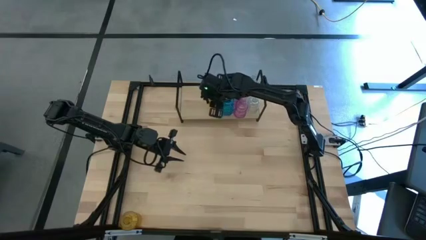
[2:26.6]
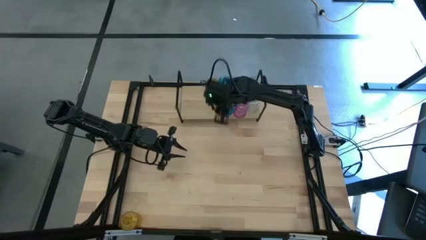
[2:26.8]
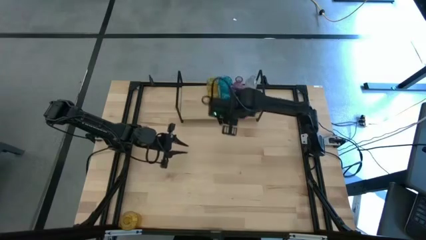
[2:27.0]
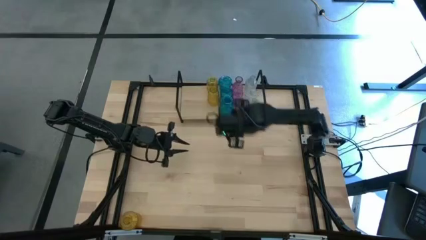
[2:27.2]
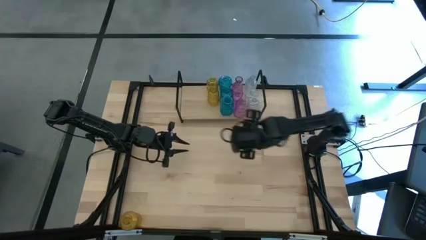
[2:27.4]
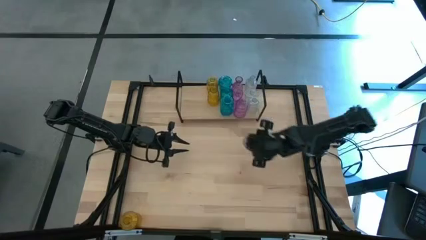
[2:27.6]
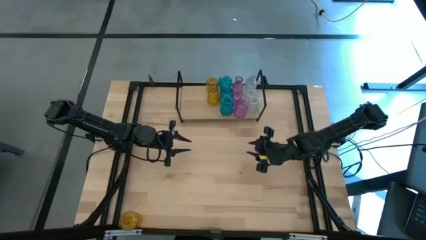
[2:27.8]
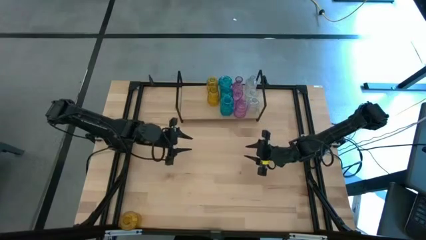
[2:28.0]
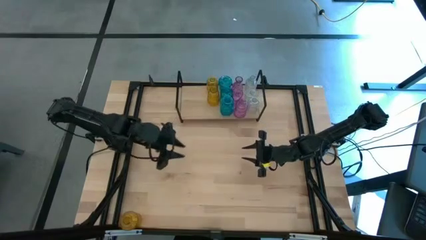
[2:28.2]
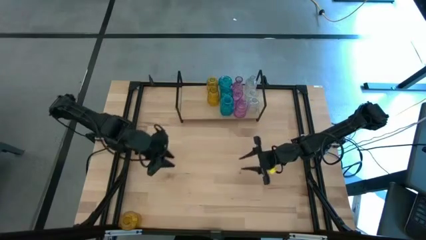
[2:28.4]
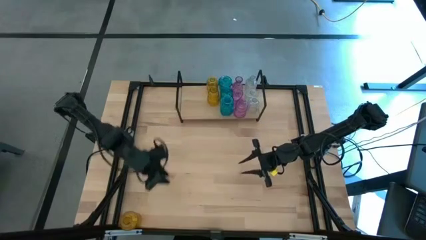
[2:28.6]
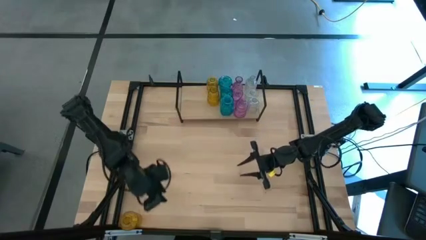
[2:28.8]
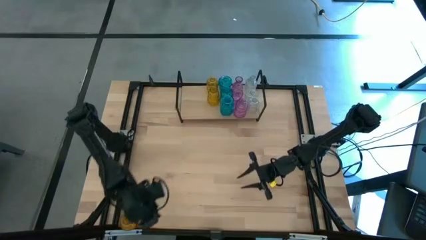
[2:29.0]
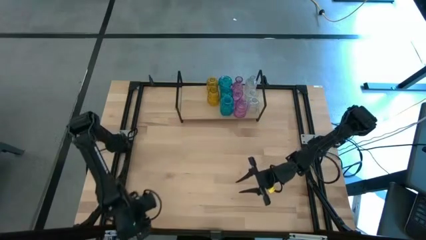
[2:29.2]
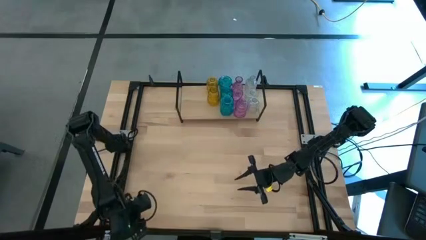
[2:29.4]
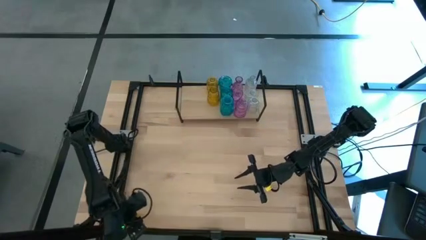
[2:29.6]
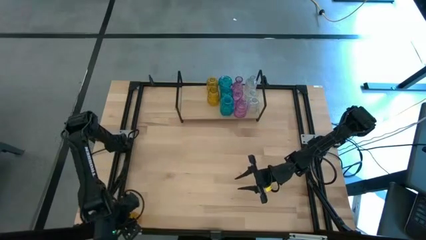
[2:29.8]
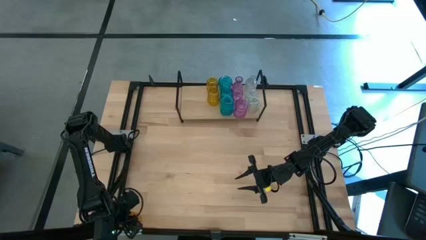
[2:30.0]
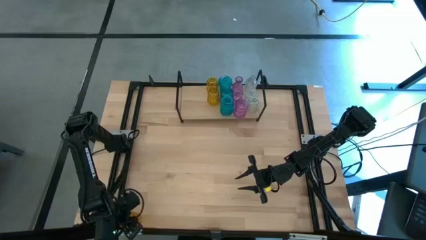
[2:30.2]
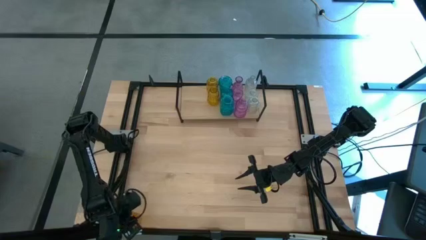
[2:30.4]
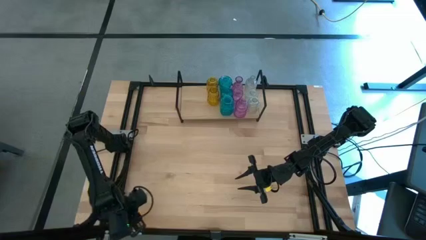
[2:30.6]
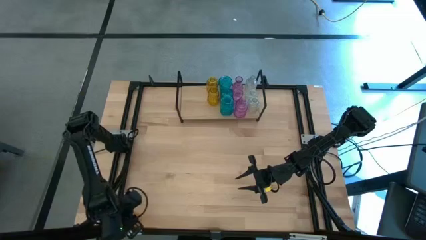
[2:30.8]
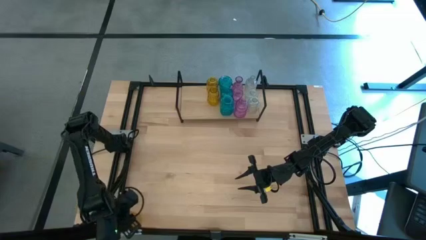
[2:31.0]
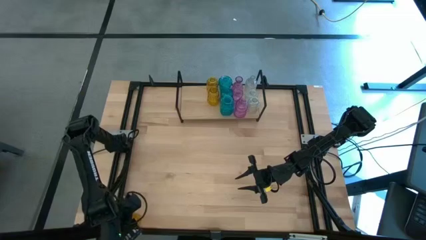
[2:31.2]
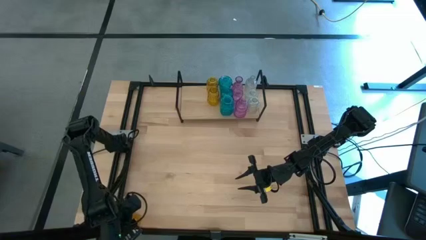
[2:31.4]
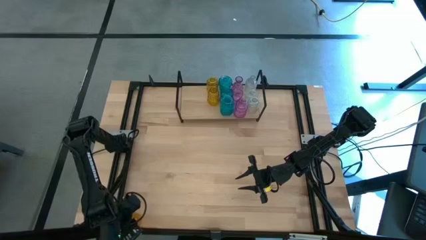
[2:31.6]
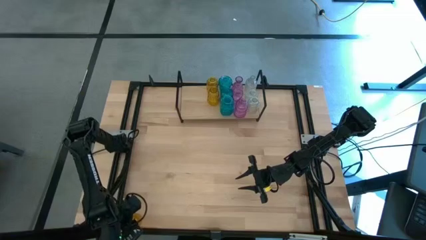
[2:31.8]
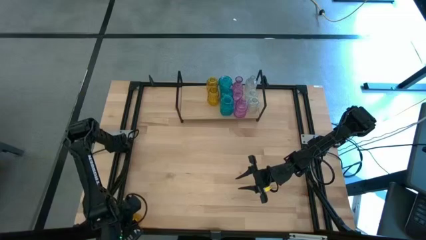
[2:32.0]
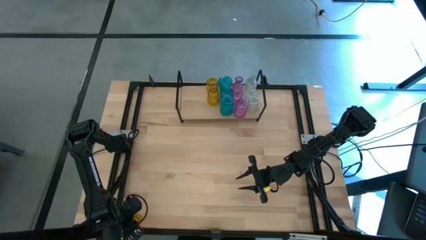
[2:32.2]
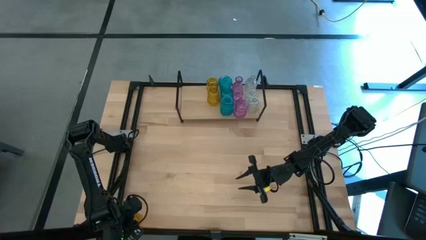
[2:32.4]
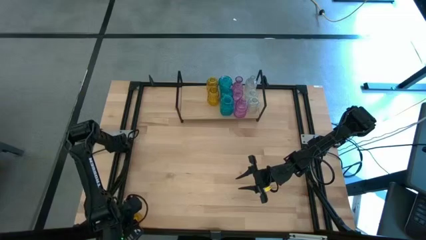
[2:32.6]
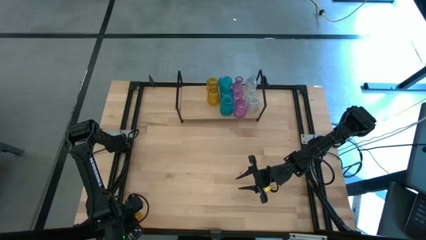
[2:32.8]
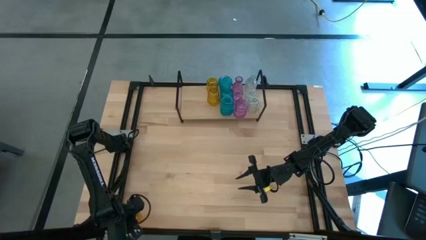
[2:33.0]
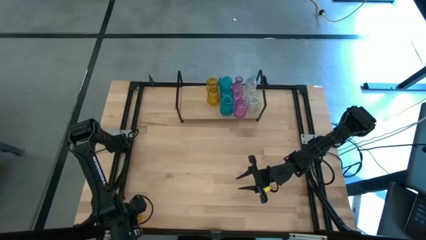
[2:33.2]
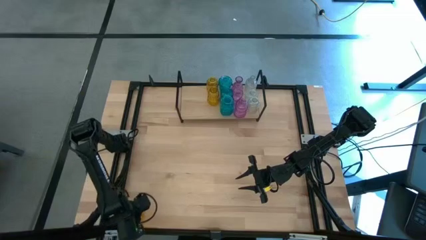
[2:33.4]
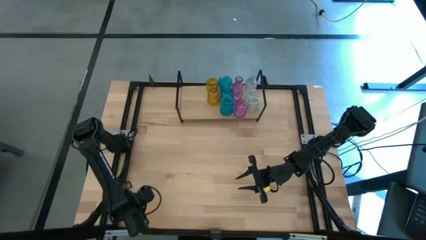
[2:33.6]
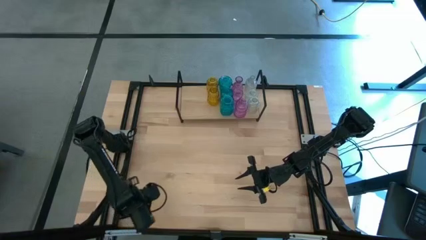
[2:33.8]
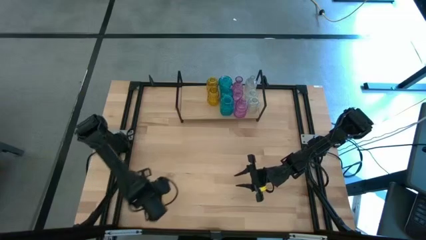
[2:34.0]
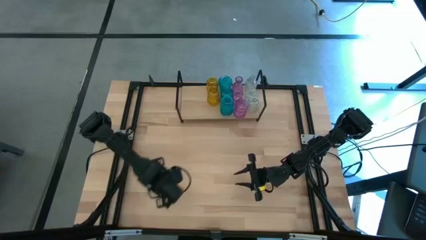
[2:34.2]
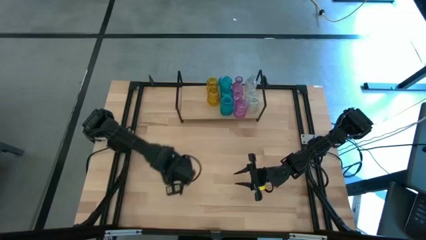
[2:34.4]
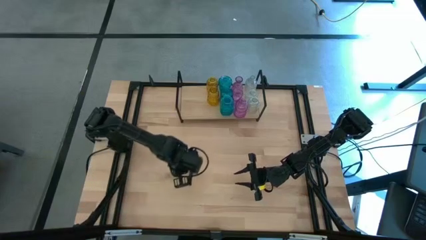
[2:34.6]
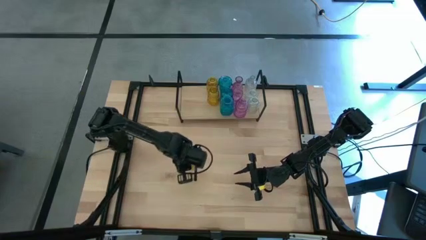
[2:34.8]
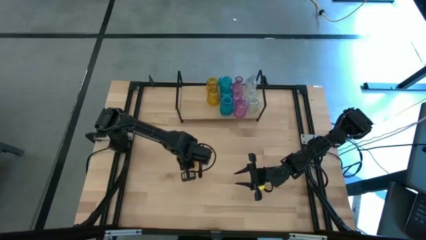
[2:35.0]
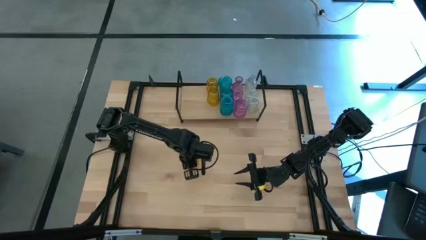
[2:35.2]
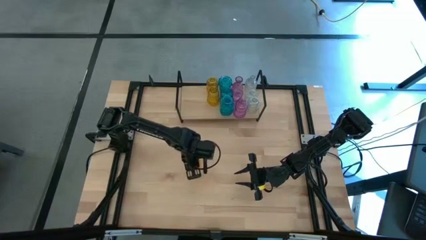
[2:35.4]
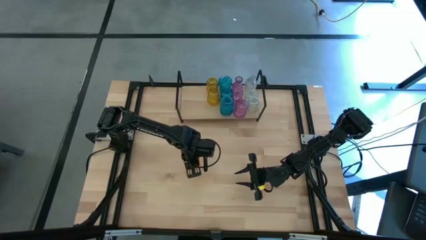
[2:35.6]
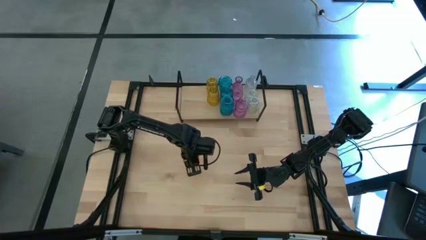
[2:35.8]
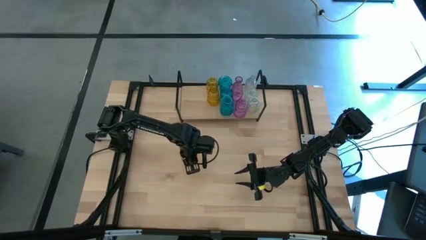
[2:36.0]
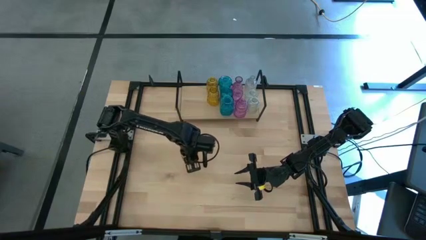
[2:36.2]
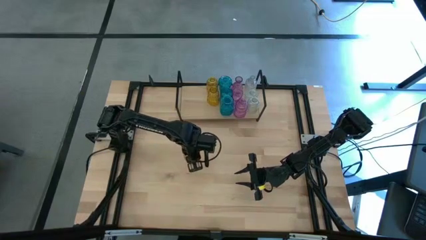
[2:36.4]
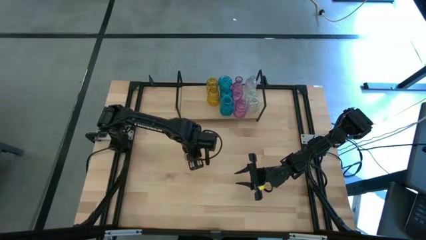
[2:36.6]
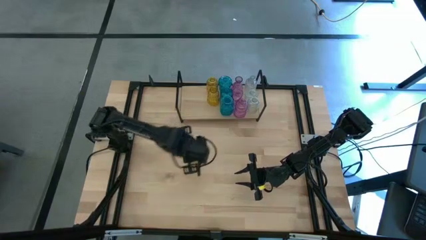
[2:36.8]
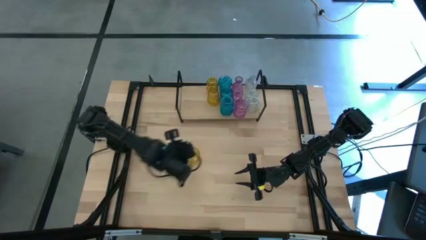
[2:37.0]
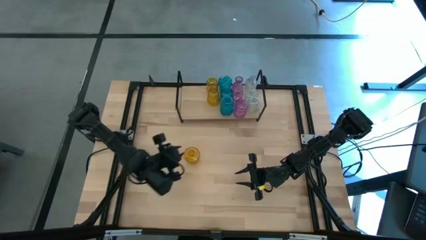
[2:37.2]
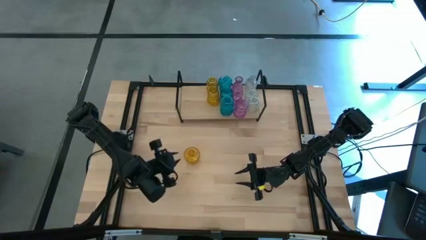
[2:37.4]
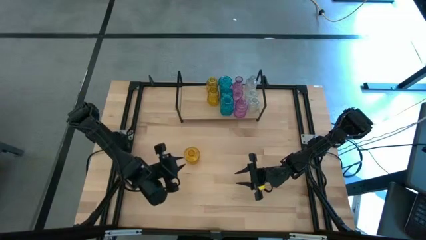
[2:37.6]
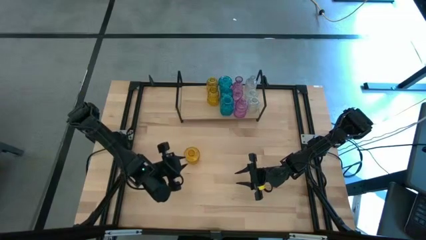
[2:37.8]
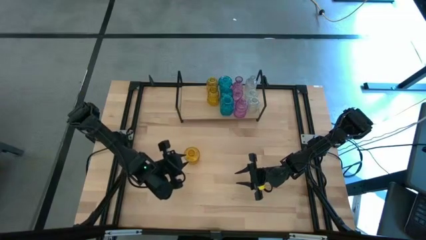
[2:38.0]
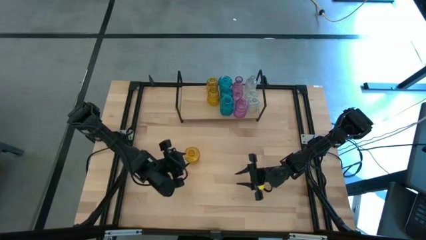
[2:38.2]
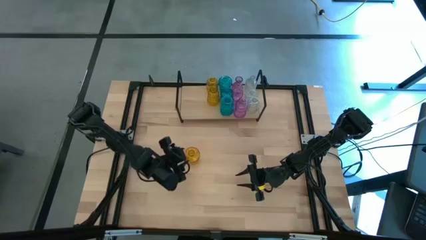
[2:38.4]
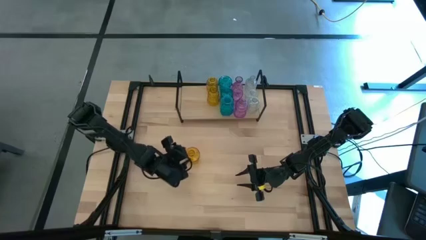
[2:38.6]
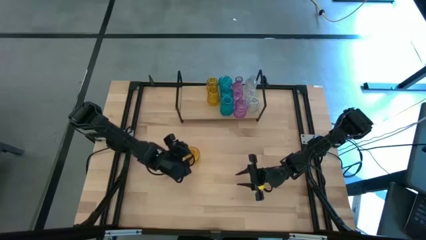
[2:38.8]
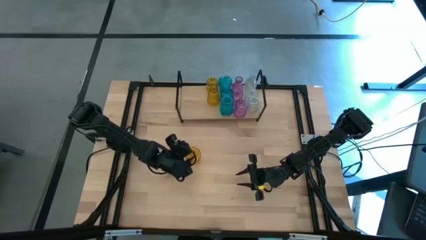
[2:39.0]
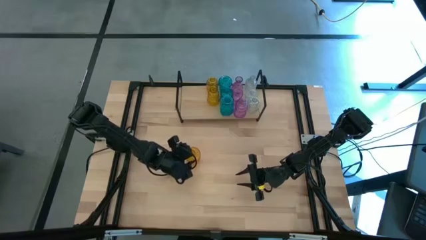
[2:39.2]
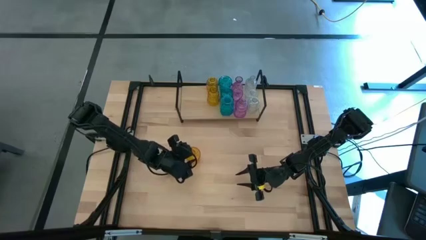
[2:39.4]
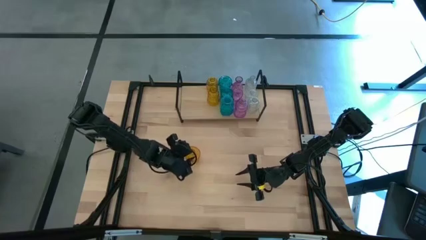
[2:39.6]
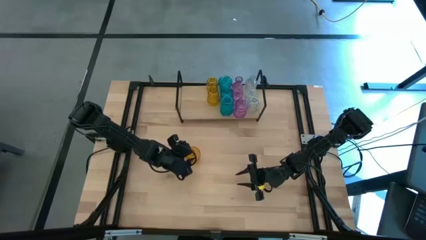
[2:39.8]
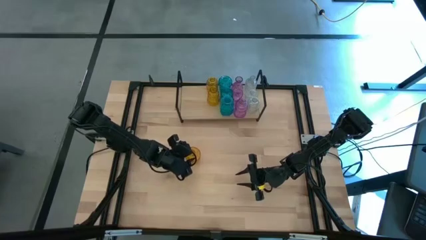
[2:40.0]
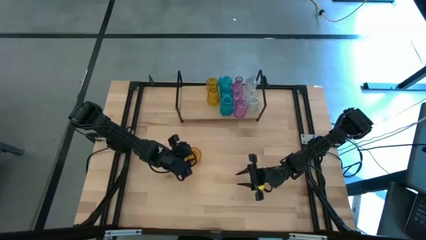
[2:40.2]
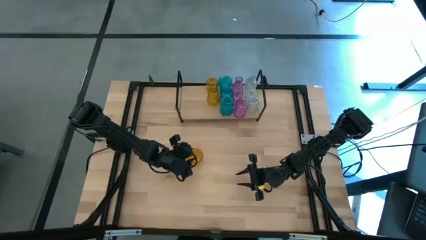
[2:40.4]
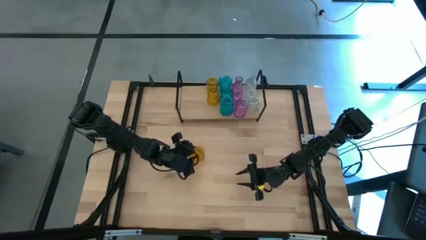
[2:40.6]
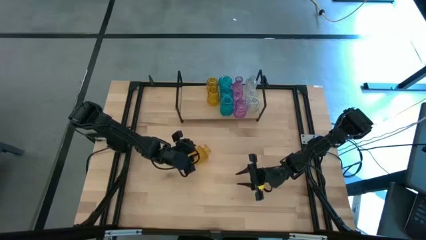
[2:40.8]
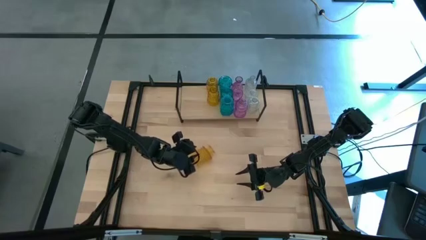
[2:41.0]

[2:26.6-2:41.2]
Task: sort vases onto shelf
Put the yellow vase aligned with the other yellow vase on the shelf

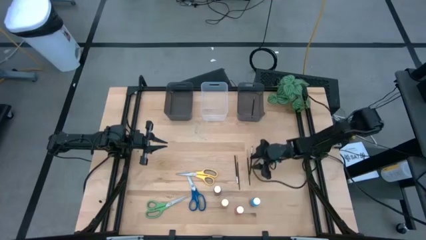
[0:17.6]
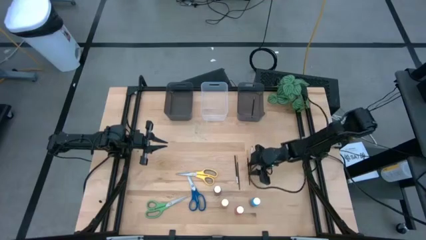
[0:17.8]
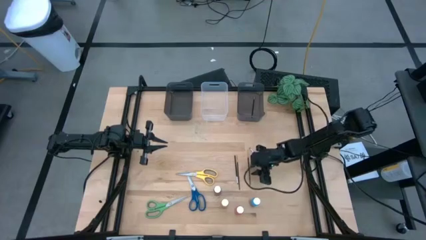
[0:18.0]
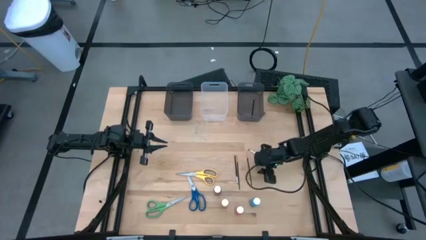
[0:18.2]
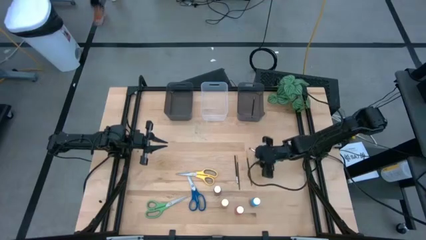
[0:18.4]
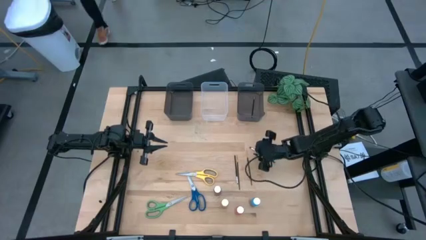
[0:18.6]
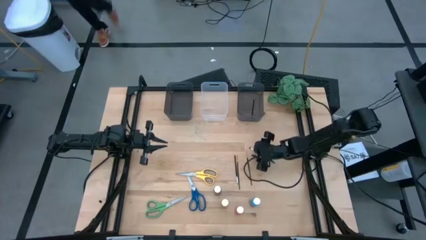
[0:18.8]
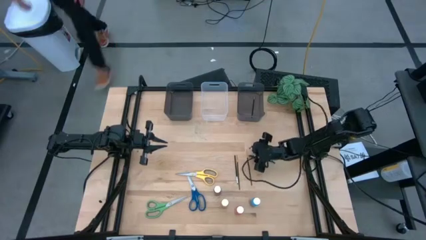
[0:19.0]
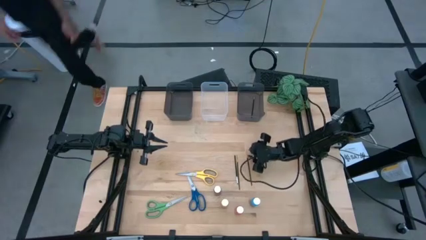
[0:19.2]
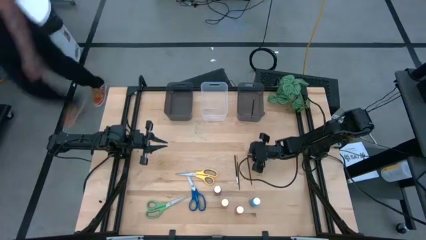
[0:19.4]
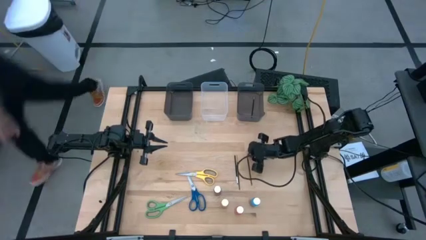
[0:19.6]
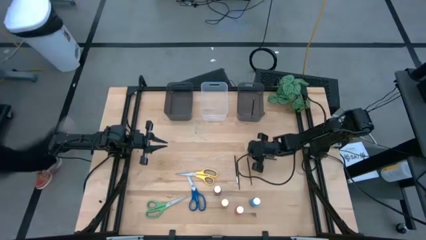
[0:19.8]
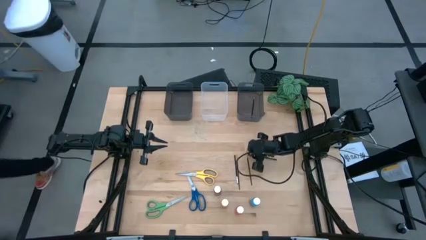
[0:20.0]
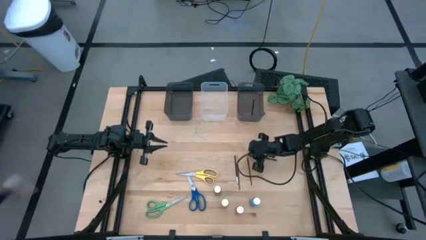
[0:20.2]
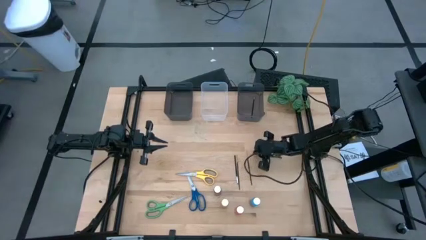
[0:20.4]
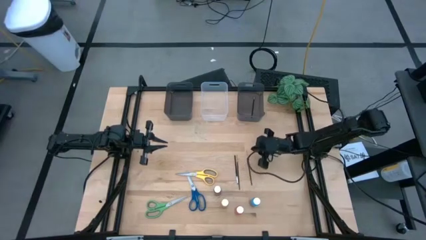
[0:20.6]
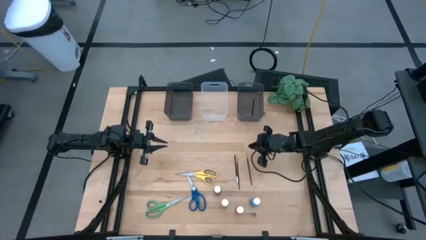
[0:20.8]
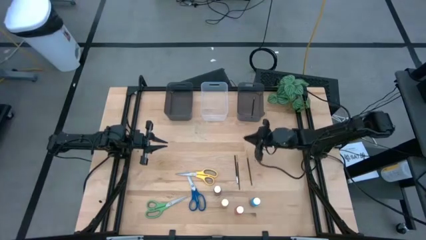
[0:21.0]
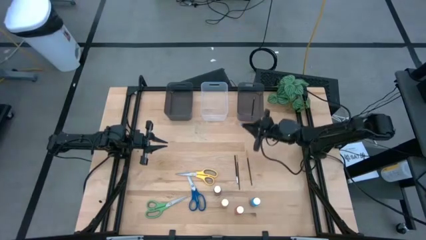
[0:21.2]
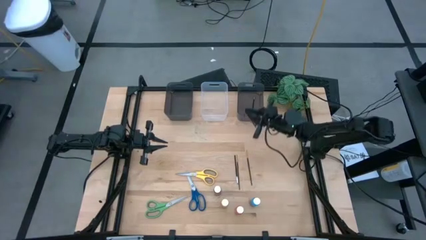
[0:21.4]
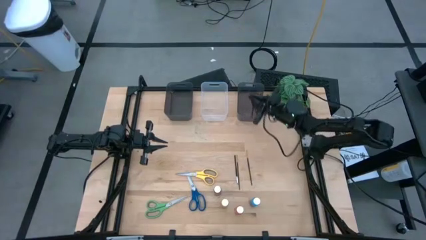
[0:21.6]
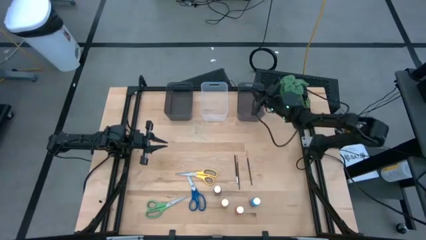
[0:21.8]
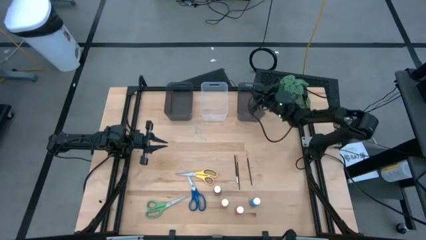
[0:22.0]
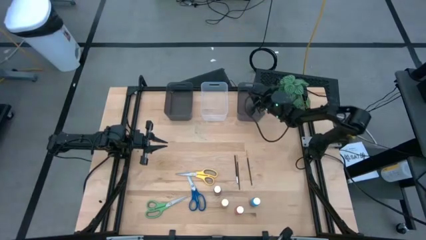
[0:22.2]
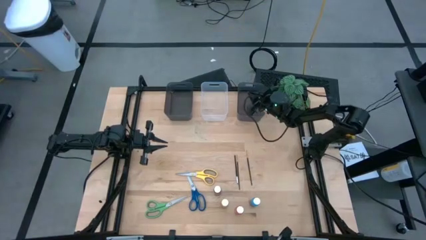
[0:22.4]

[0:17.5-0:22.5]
Task: Pick & Place Paint Supplies
Put the black paintbrush into the right black bin
